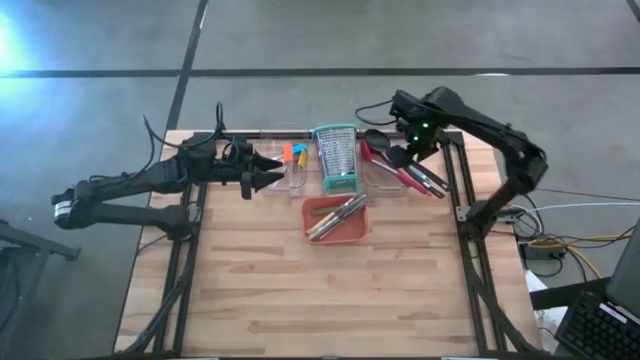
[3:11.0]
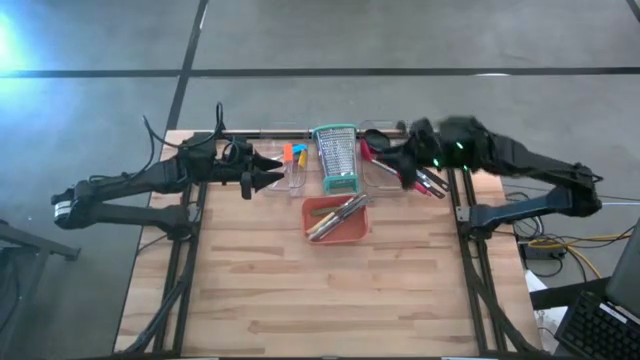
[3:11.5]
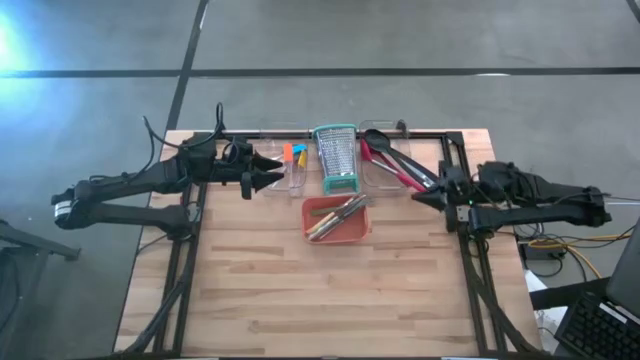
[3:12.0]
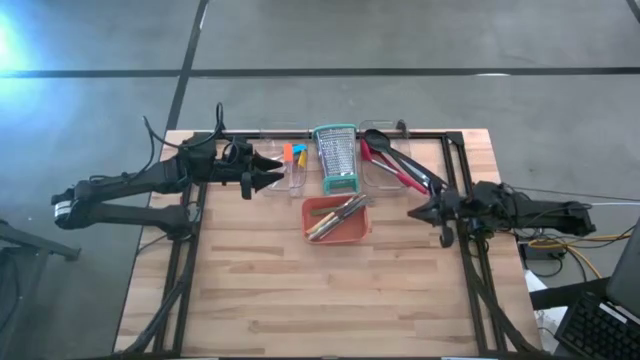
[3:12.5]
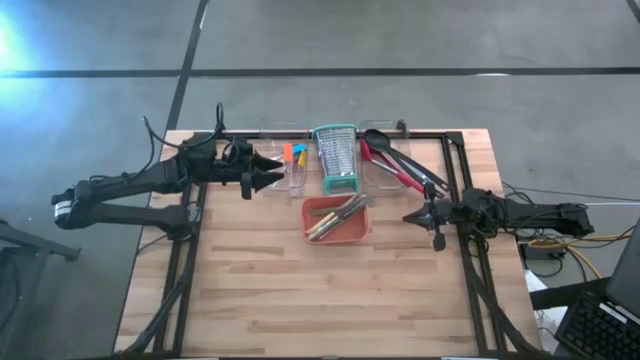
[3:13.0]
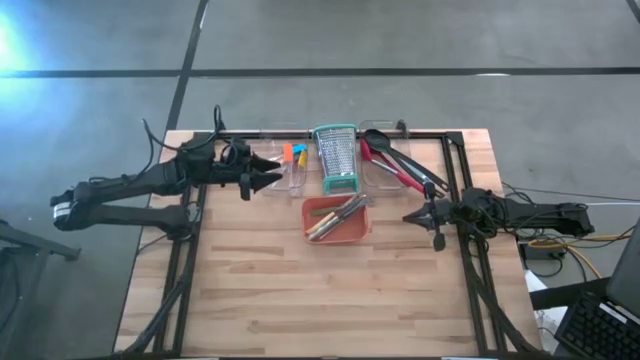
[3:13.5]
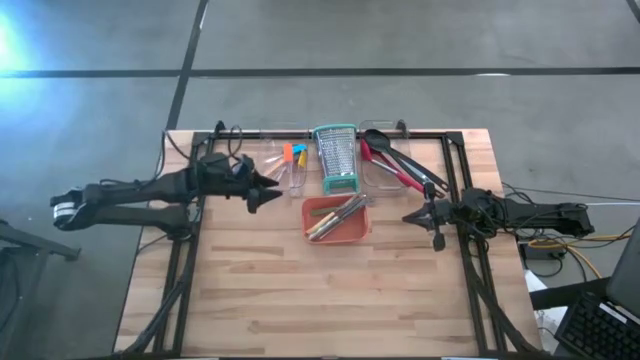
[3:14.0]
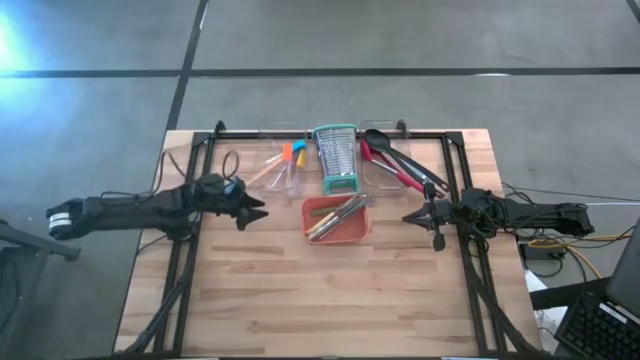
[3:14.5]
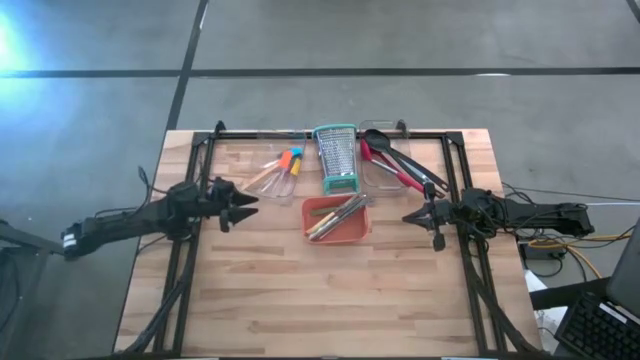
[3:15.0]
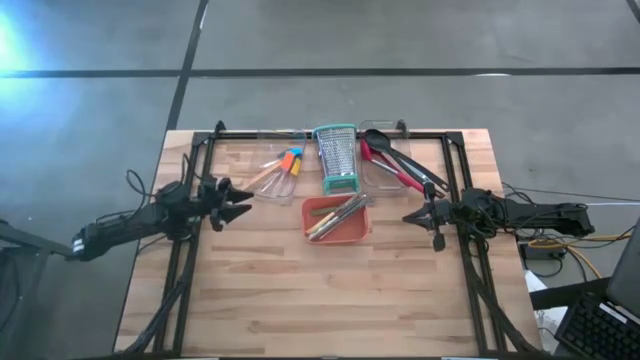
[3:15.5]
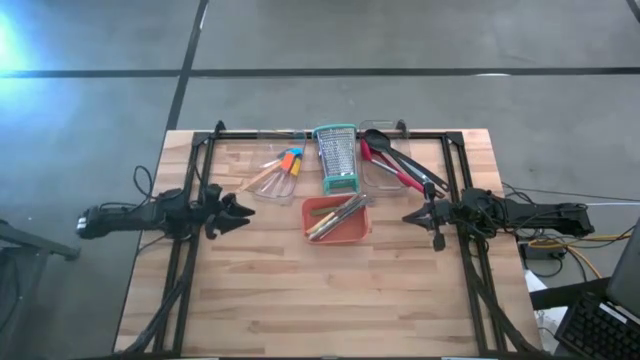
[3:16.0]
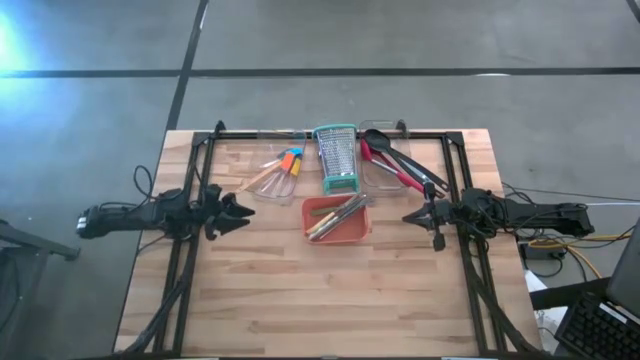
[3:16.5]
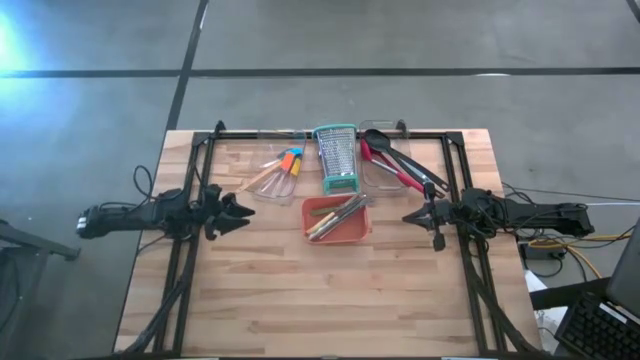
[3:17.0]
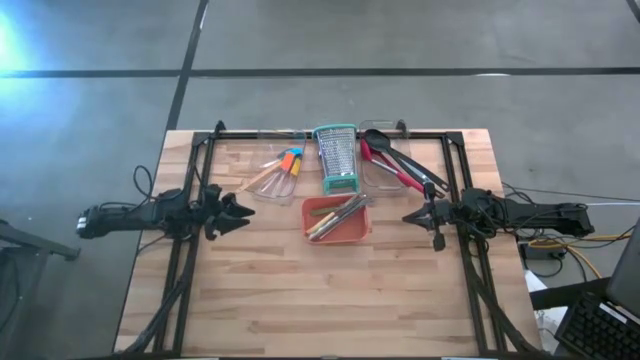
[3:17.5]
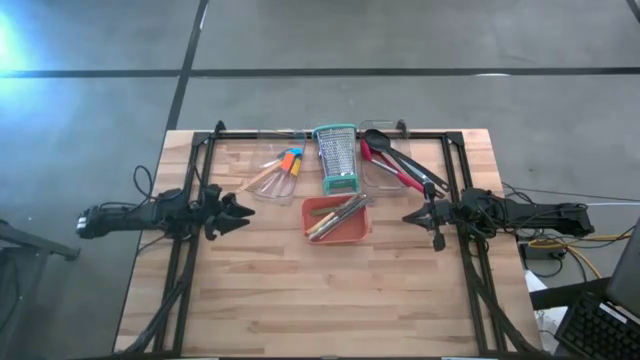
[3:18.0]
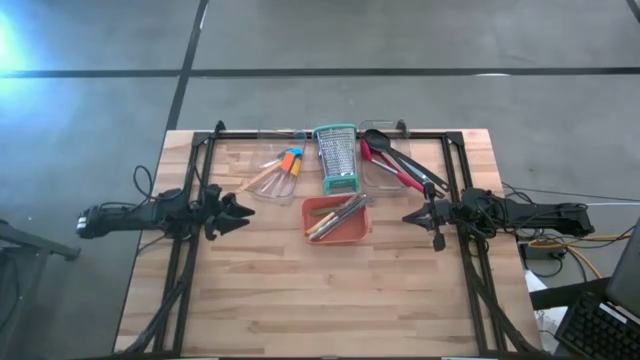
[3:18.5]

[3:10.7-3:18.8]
Task: Pick & Place Kitchen Items
Return to Home Position

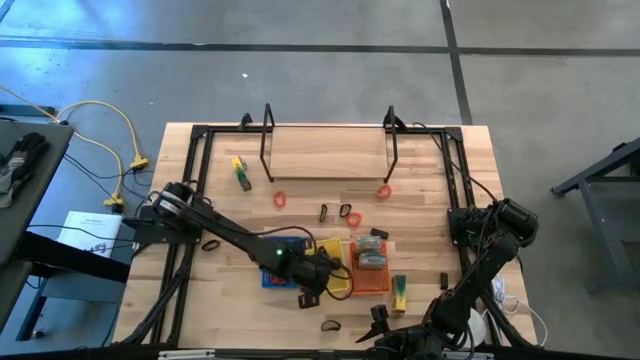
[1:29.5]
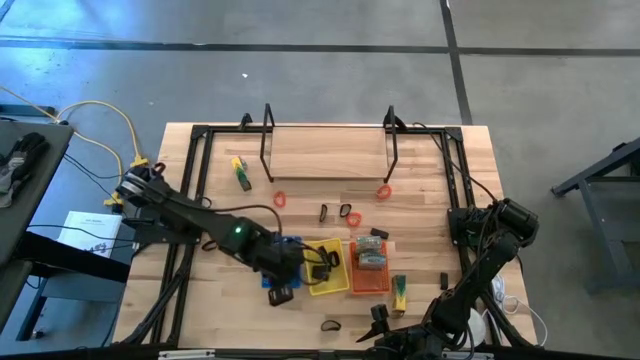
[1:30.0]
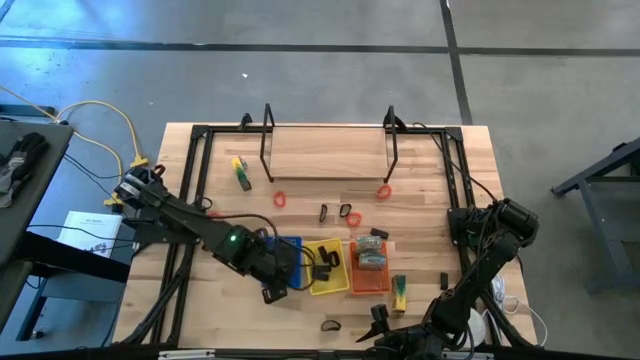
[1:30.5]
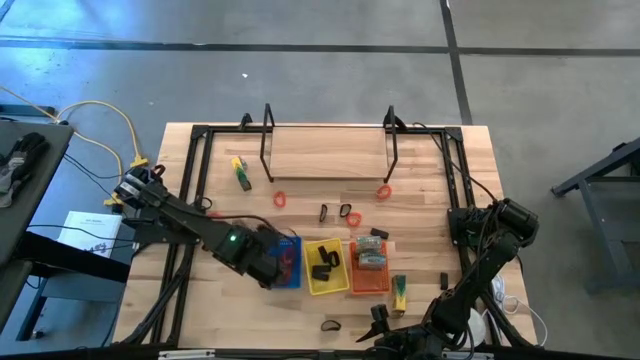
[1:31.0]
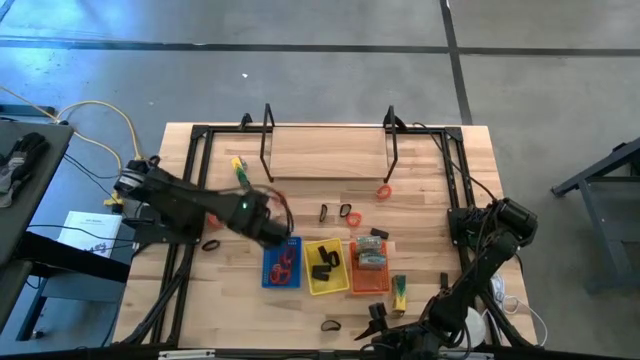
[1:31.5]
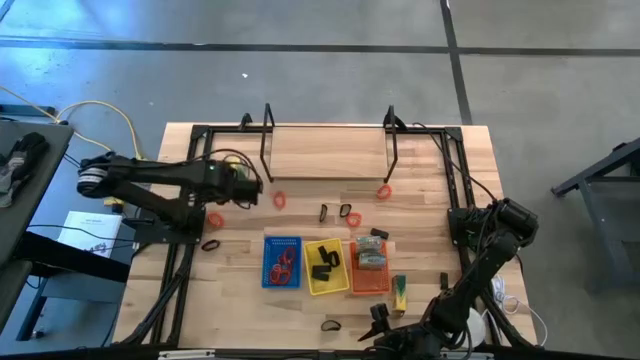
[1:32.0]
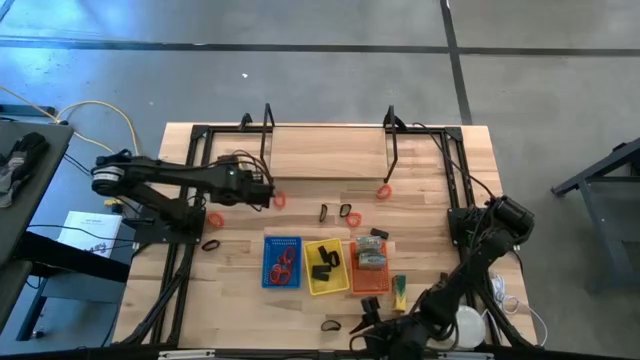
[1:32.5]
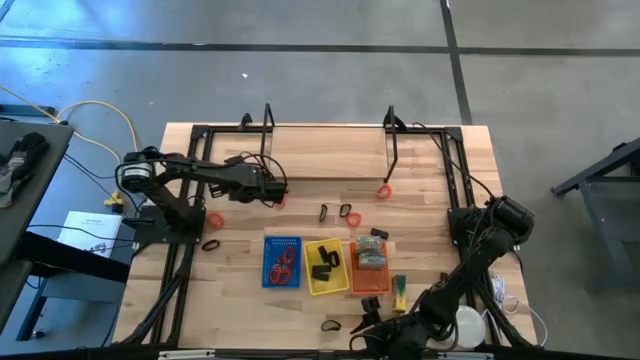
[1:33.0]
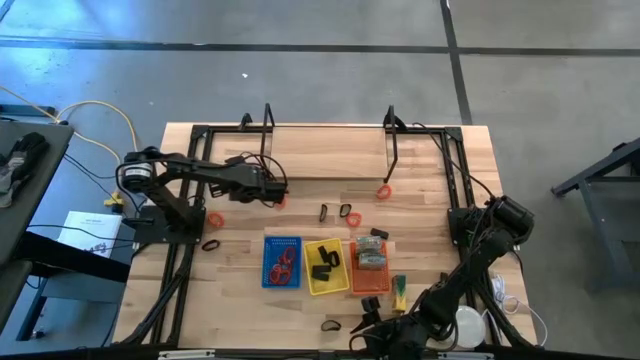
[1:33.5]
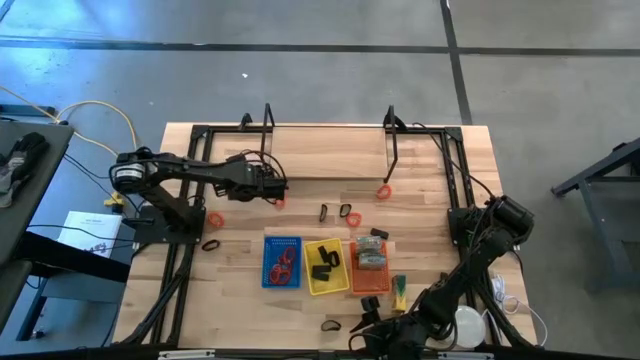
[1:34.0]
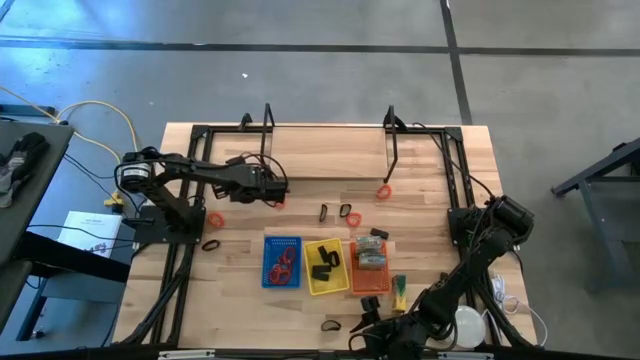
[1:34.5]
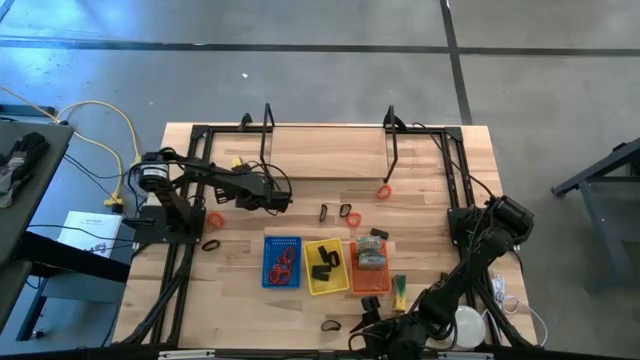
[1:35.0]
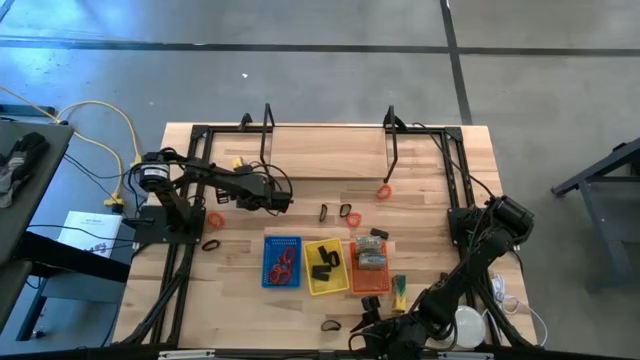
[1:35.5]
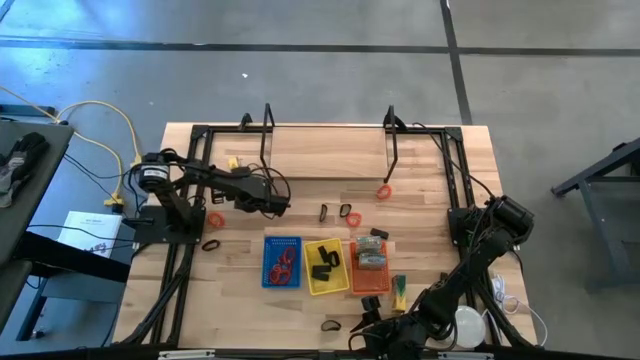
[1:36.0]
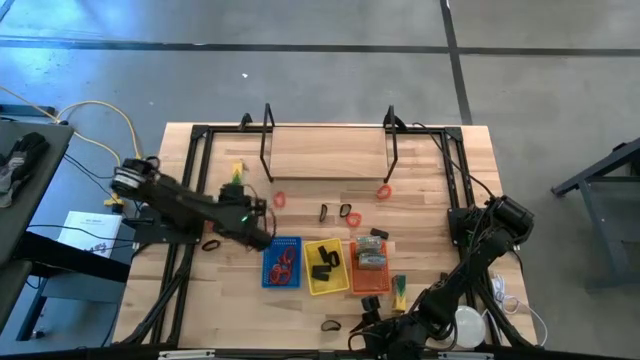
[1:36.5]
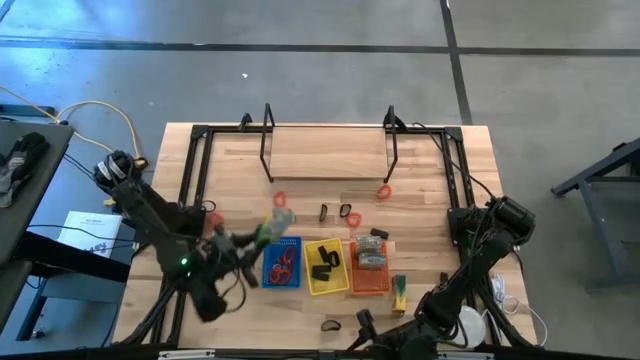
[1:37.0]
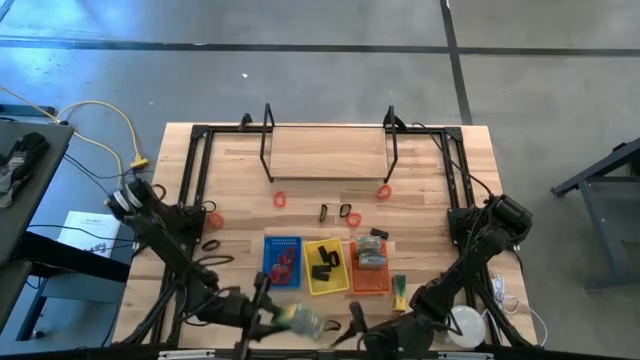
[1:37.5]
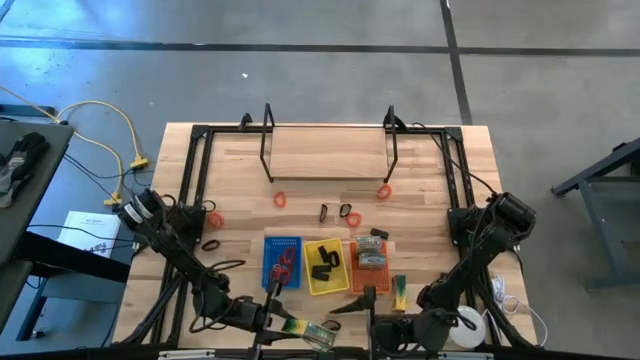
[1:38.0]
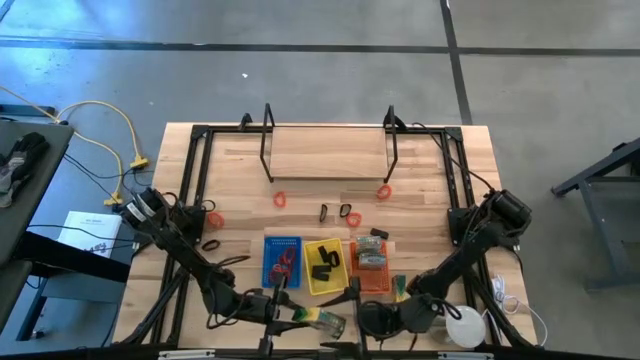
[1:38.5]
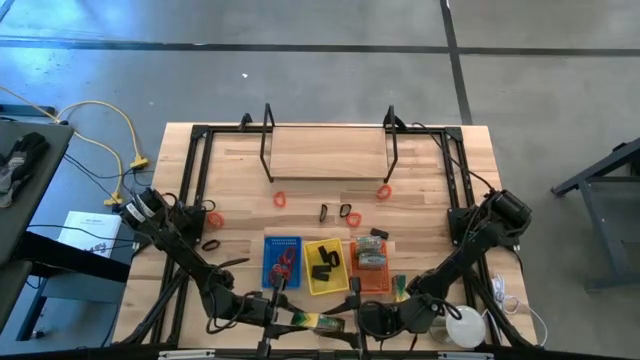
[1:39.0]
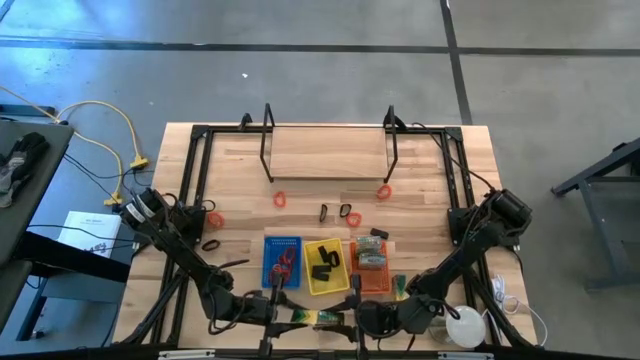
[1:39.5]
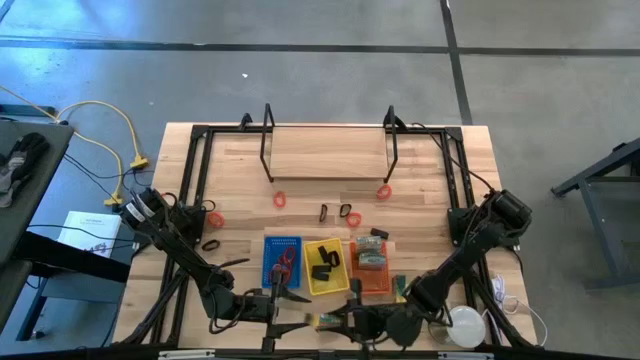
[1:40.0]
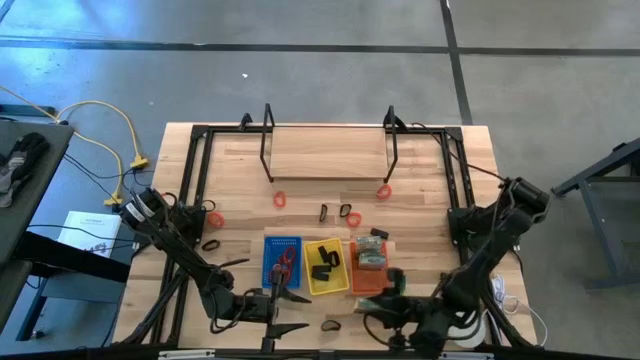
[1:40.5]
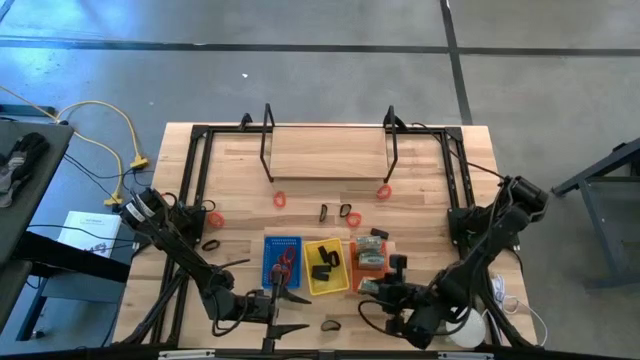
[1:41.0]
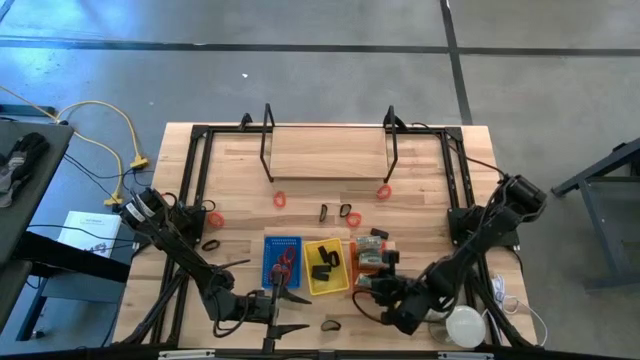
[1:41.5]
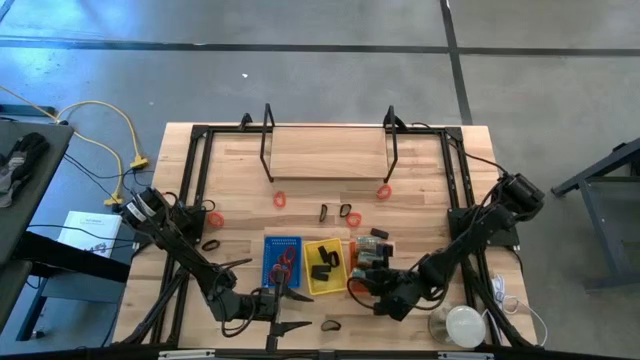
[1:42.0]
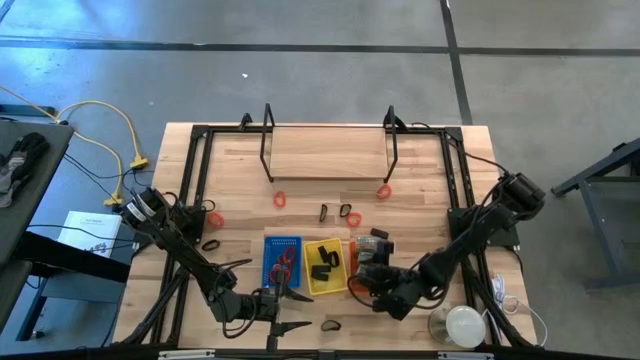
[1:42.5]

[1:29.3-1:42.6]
Task: Pick & Place Office Desk Supplies
Put the crayon box into the orange basket
